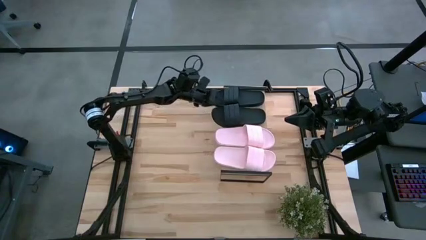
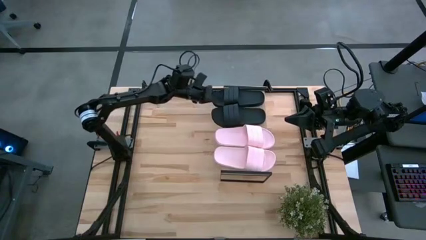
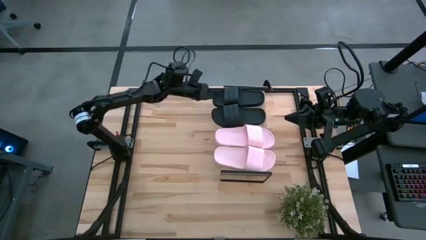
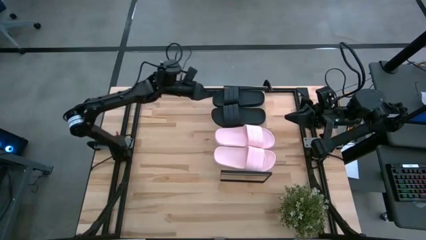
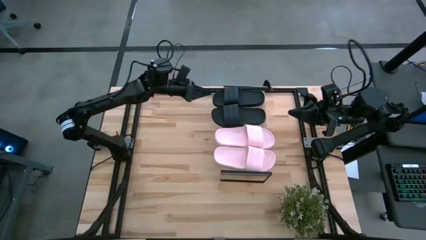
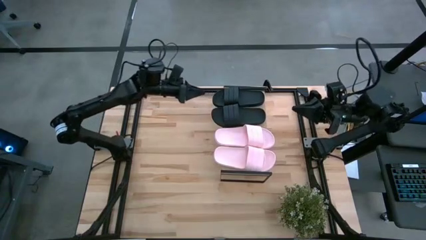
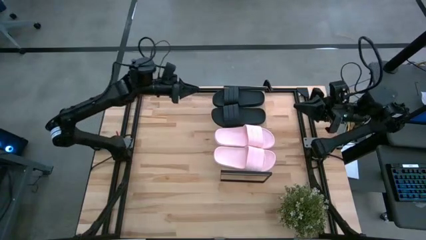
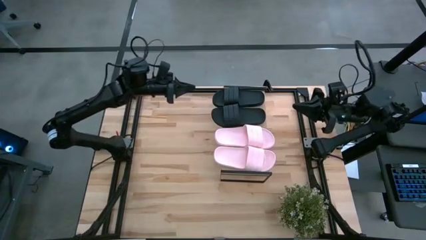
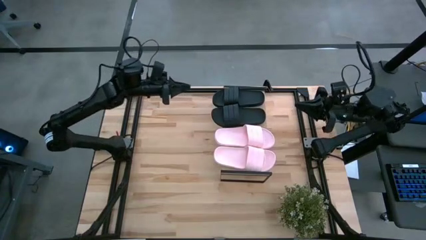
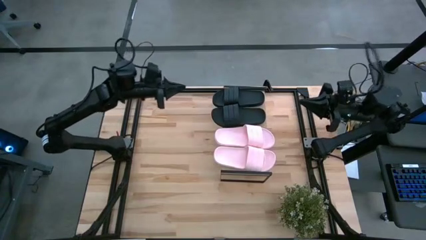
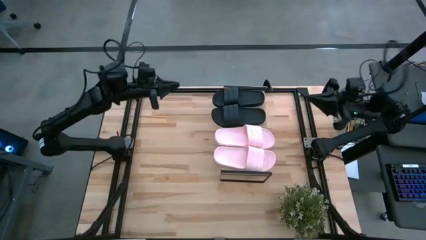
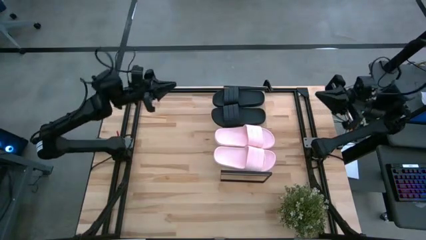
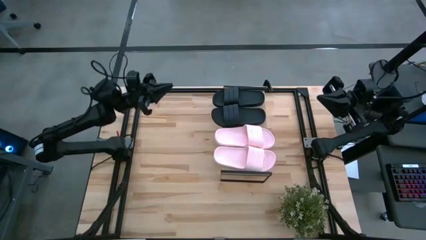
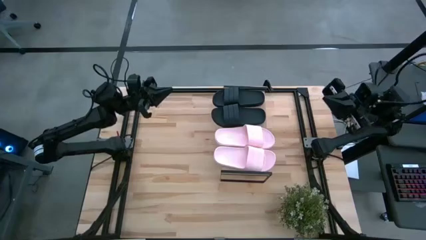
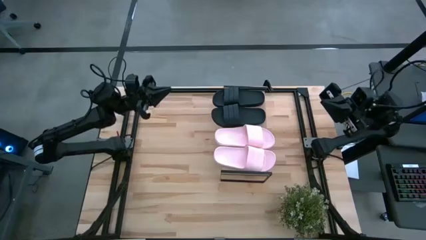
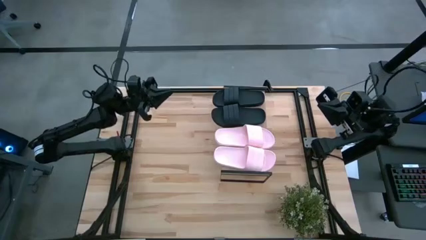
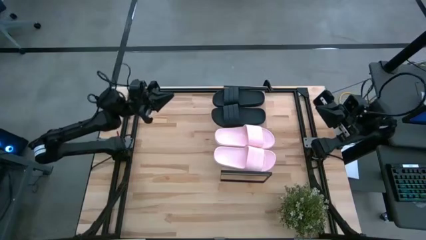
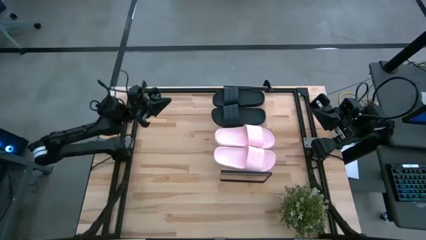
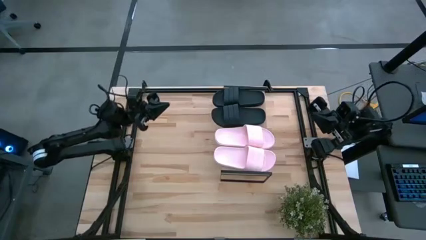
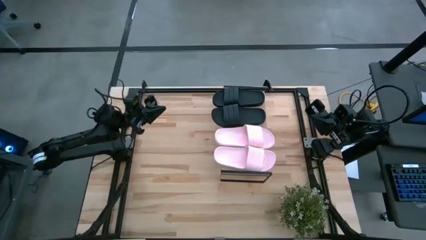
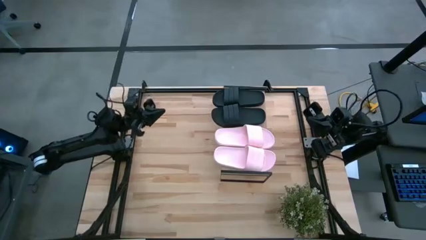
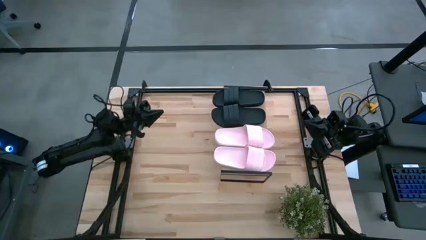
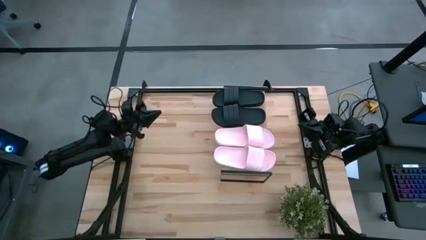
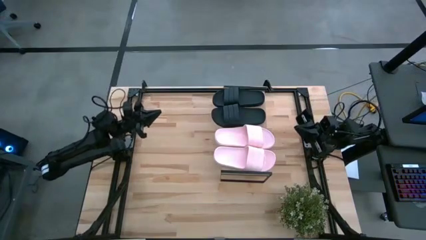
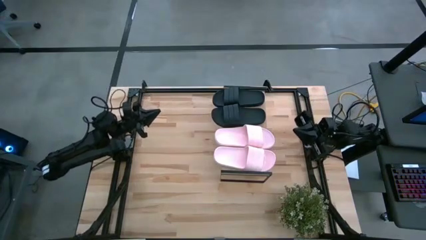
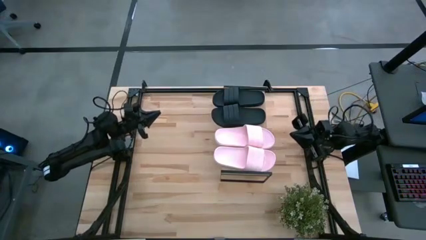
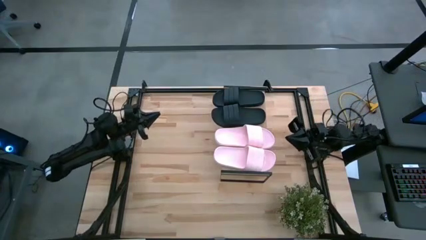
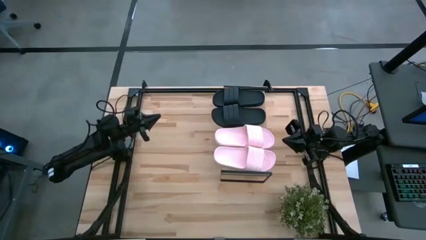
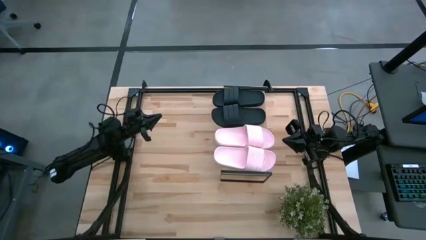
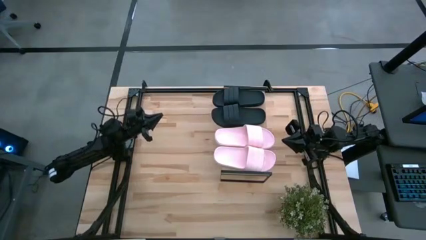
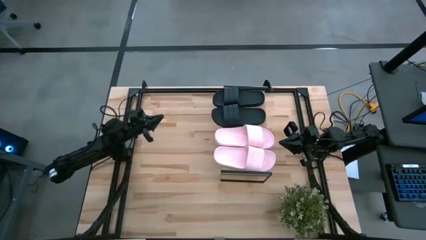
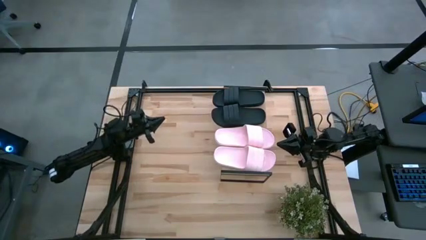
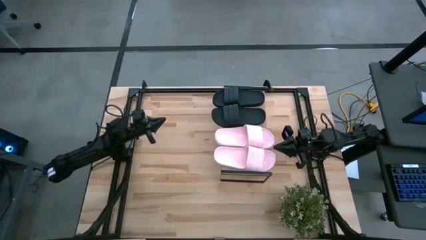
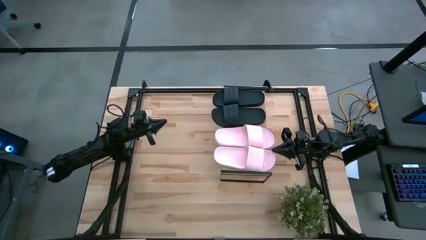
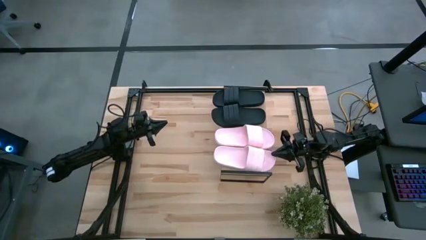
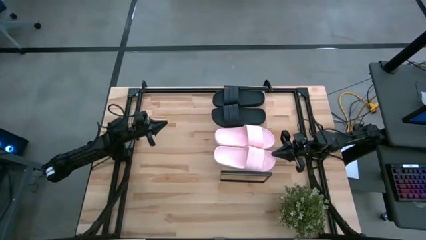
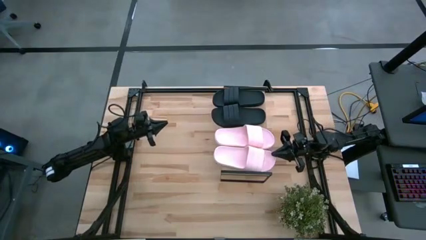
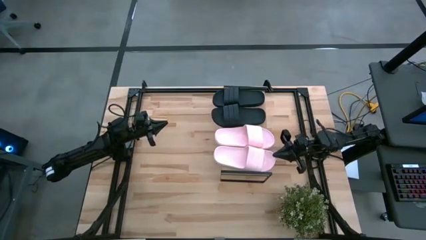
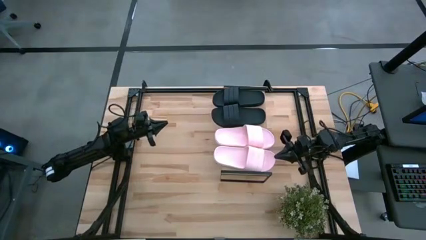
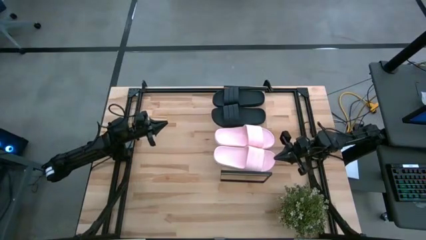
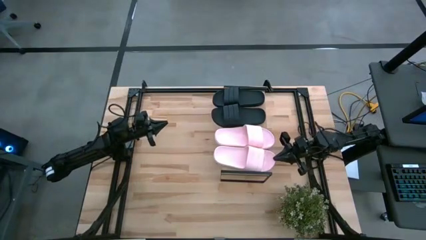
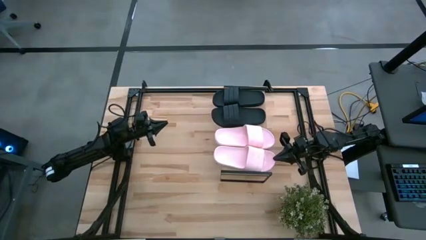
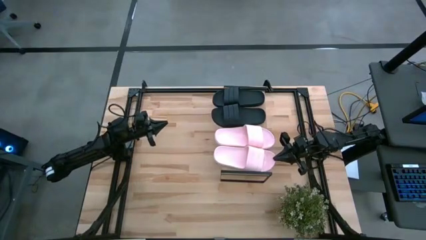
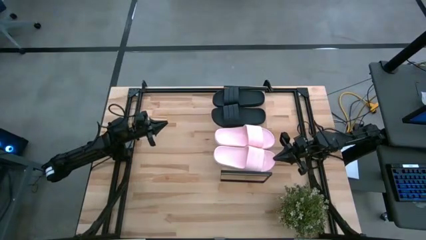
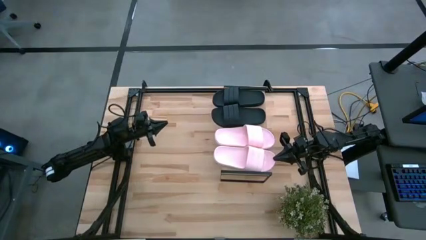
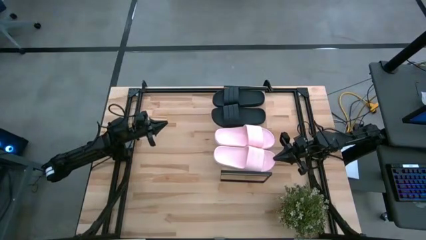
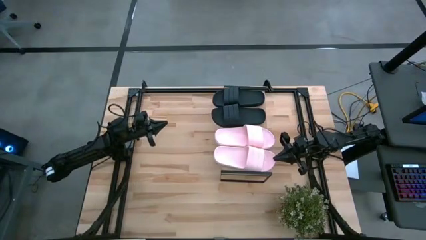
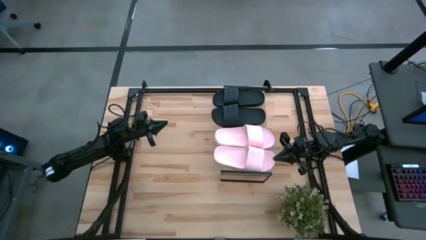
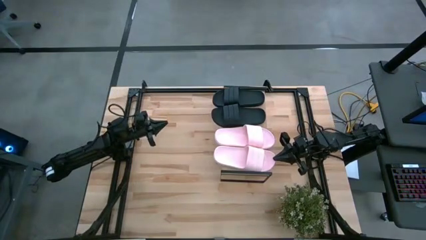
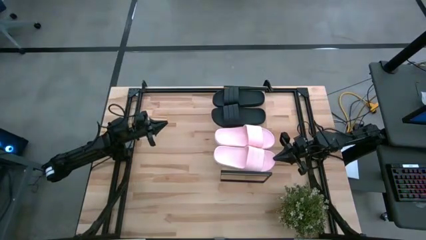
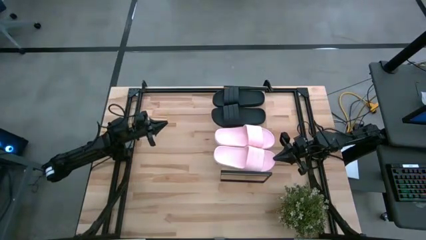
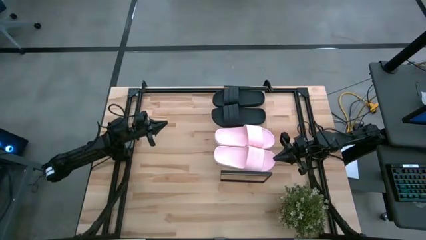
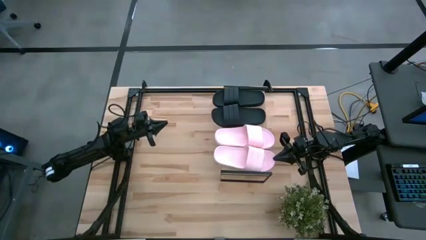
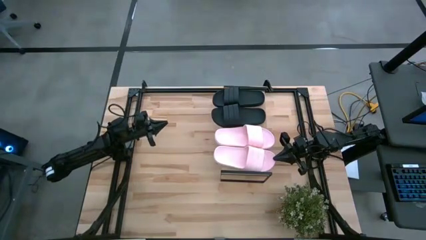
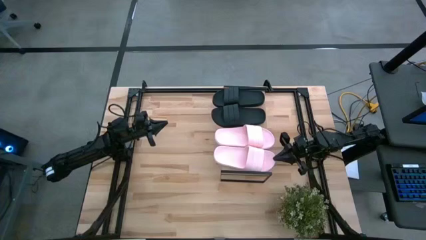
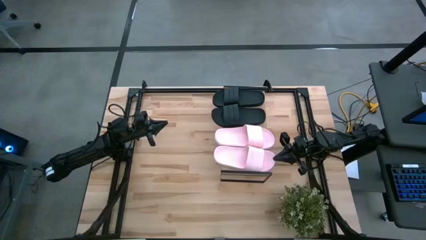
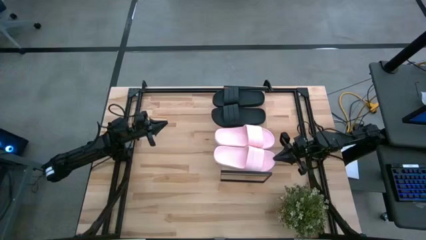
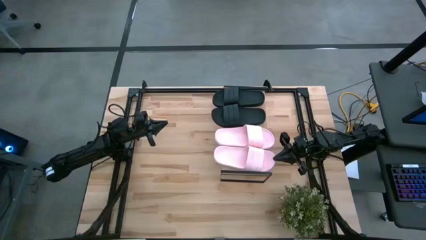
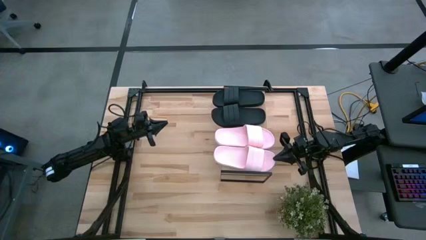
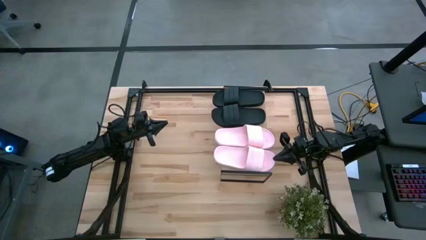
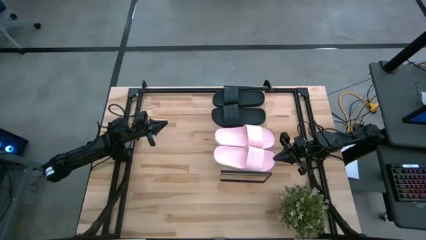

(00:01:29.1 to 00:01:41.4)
Task: Pick and place slides into the shelf
Return to Home Position
